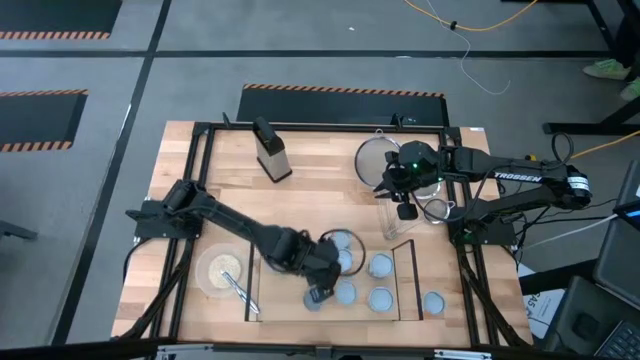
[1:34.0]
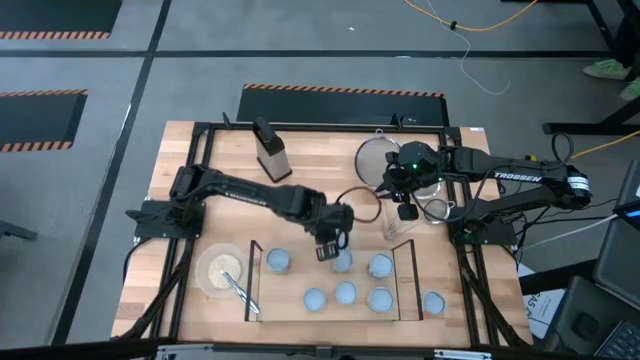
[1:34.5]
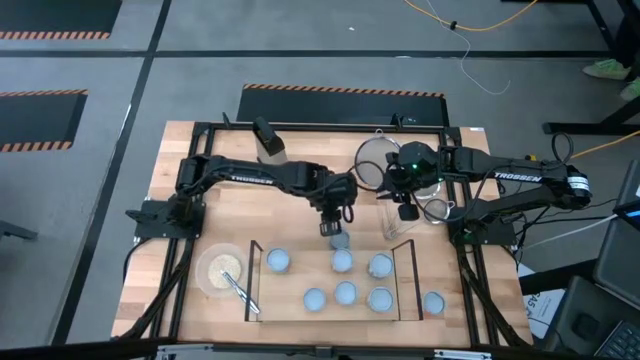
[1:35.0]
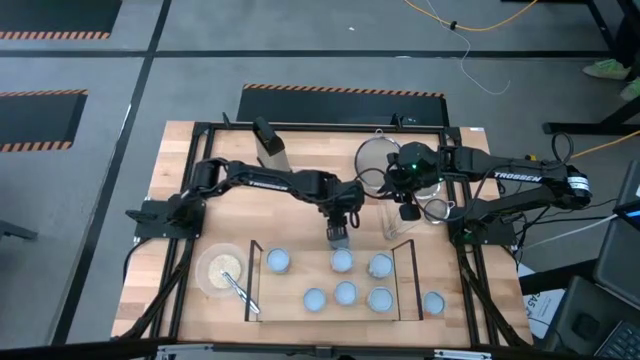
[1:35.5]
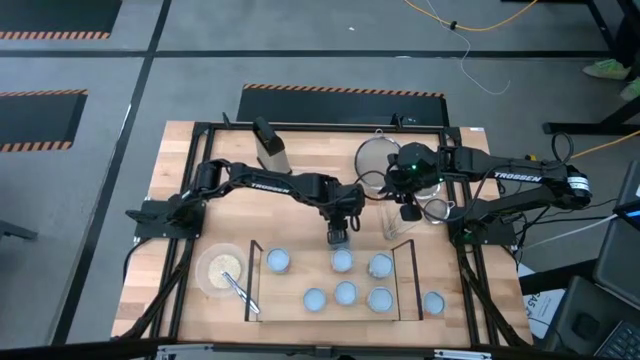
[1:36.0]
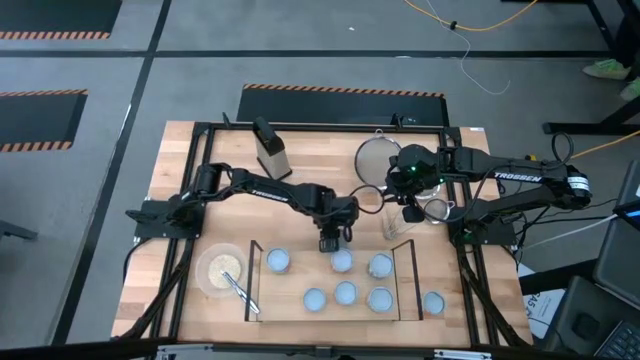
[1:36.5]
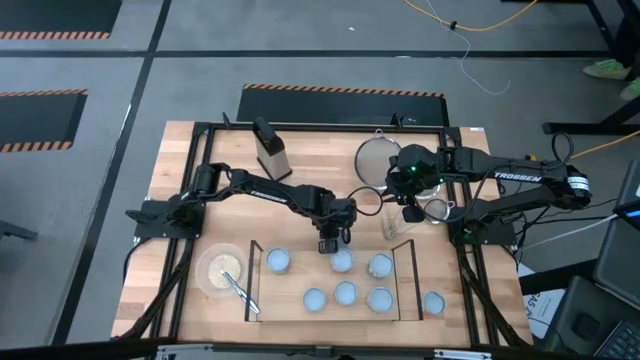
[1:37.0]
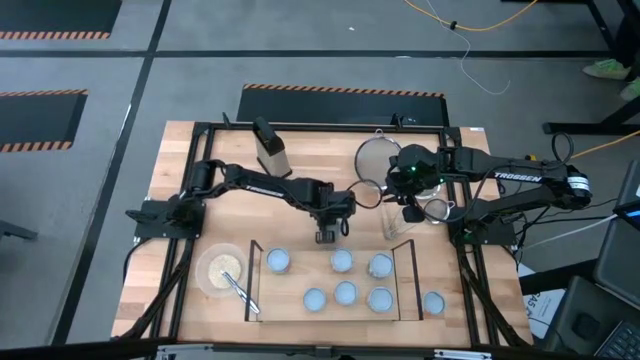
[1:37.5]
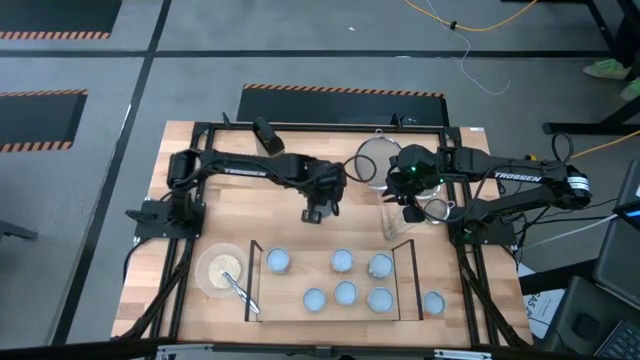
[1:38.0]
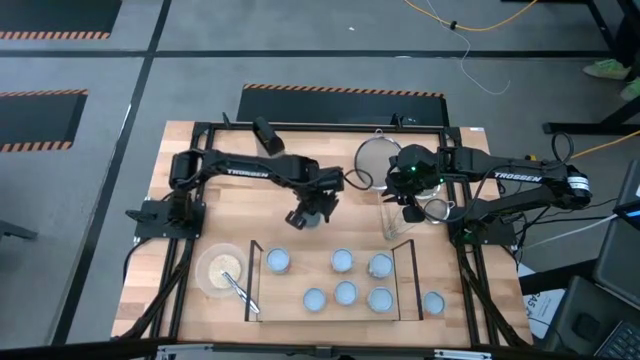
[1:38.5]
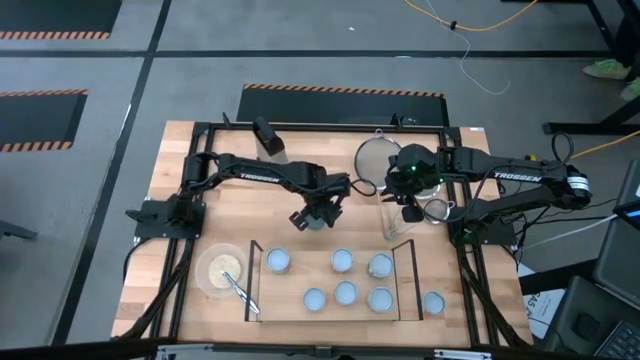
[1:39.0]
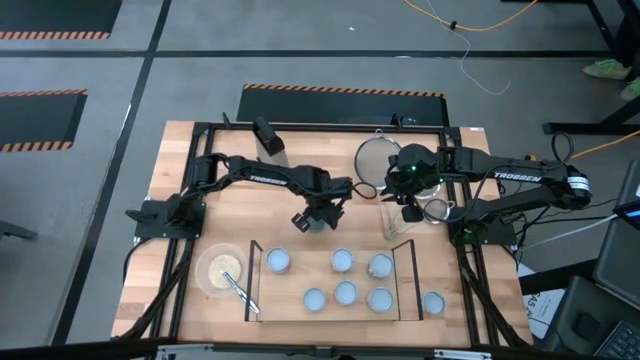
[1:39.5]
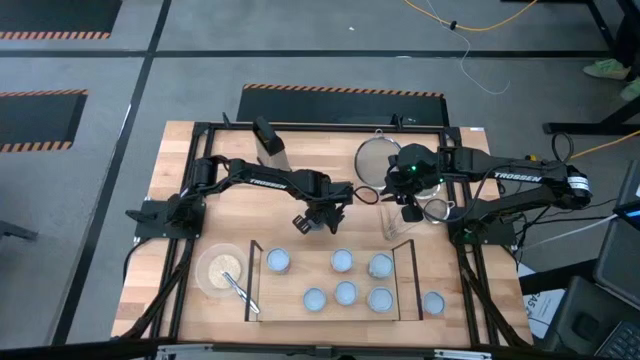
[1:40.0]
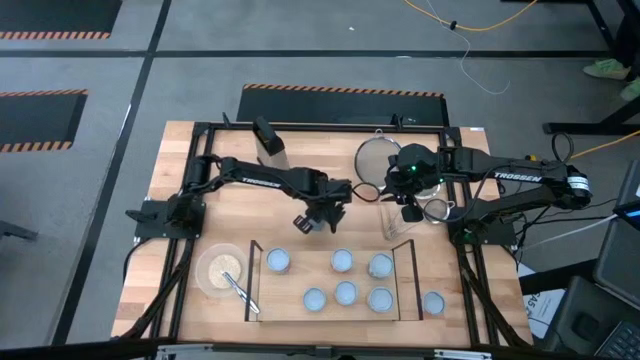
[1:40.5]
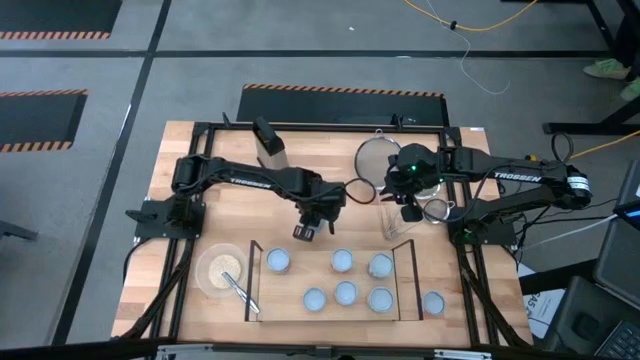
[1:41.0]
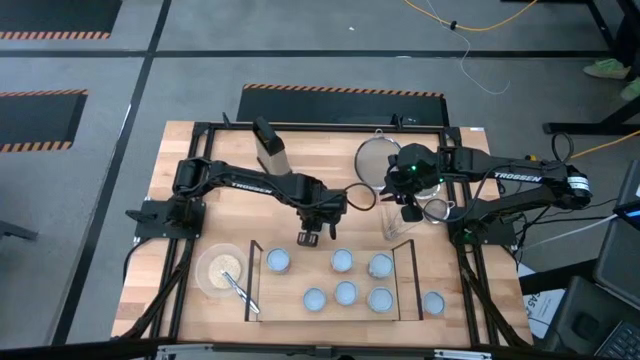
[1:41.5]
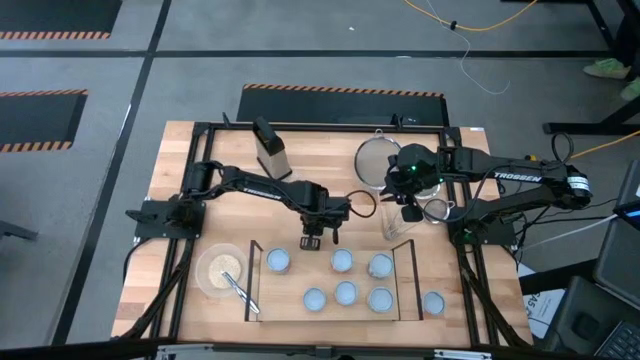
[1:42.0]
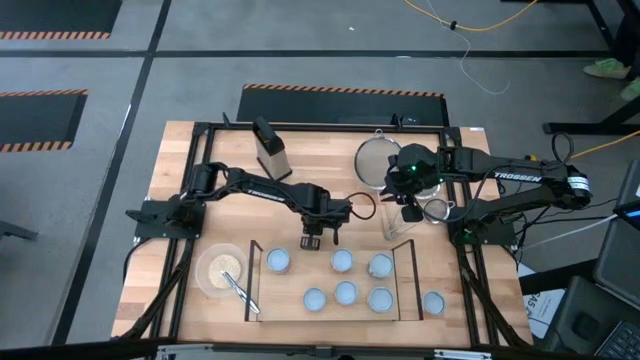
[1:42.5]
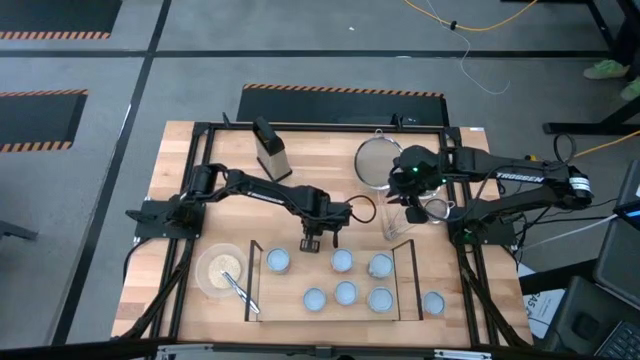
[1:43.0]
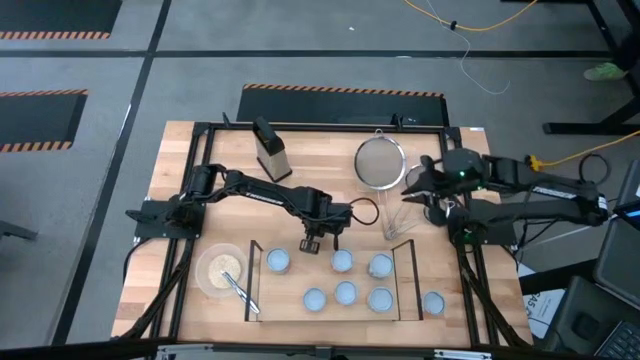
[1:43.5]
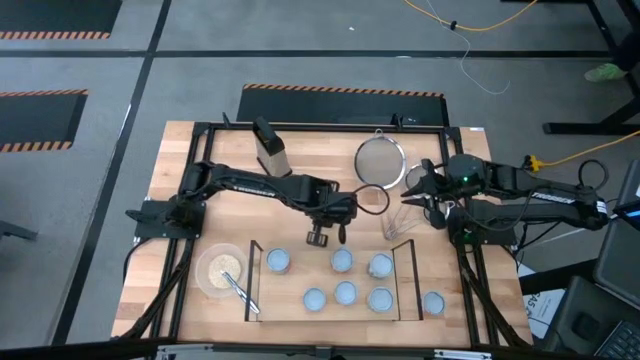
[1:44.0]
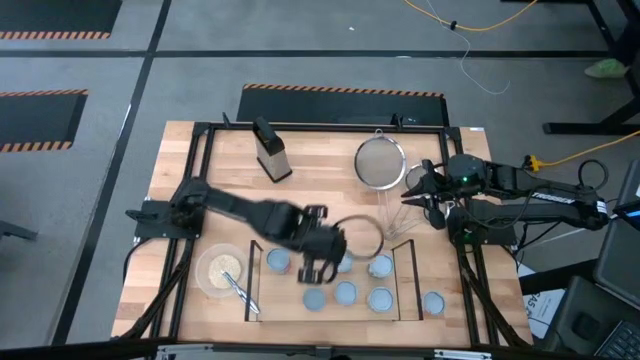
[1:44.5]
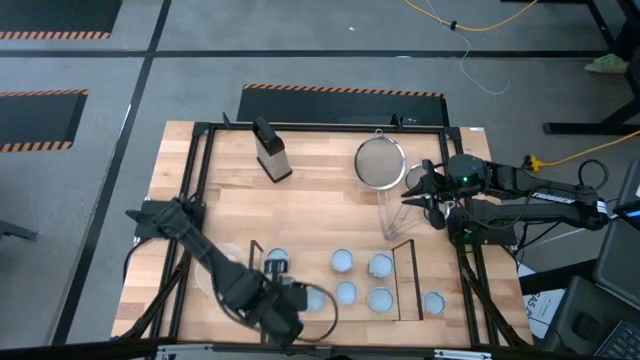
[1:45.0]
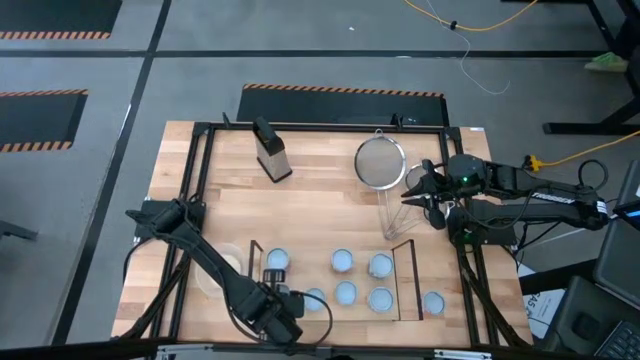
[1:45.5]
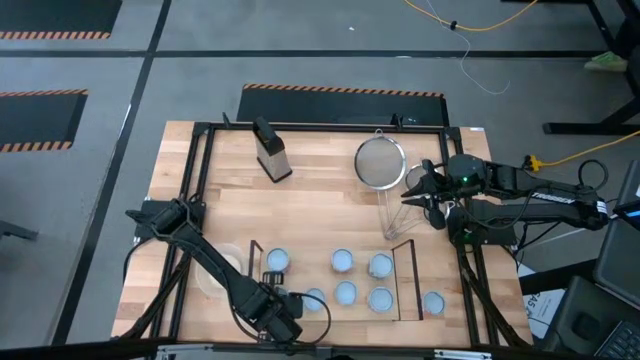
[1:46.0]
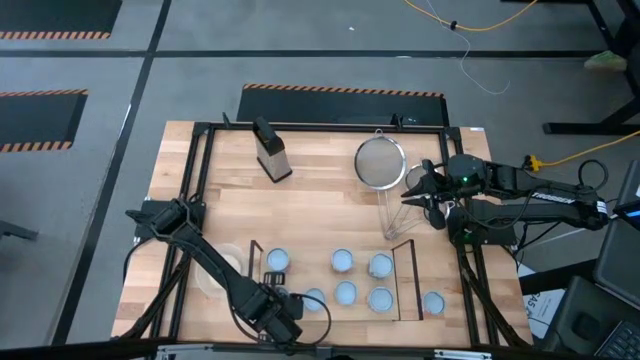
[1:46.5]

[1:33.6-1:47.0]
Task: Pick and place cans onto a shelf
Put the tuna can on the shelf

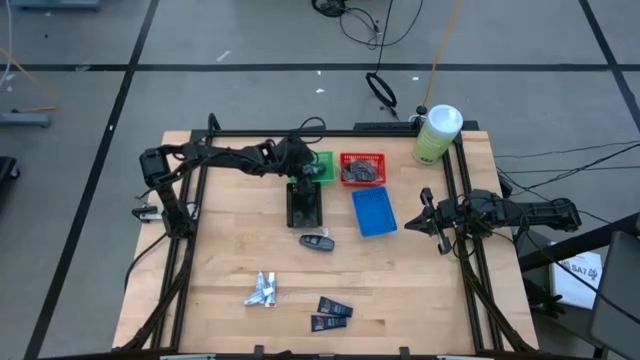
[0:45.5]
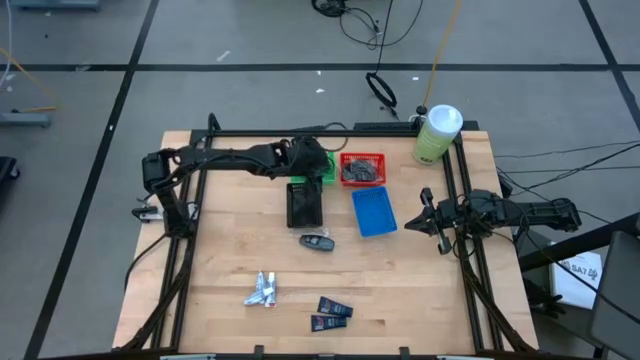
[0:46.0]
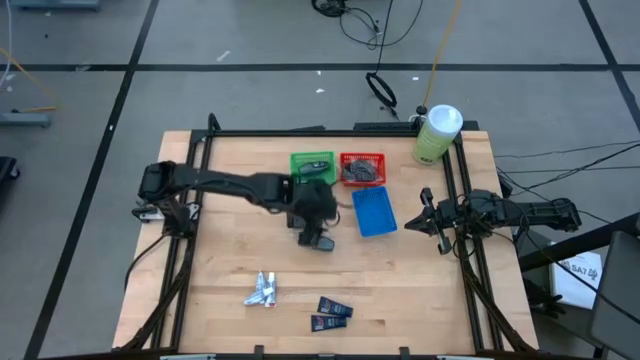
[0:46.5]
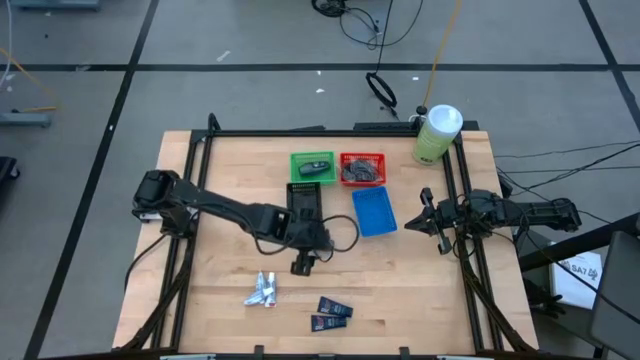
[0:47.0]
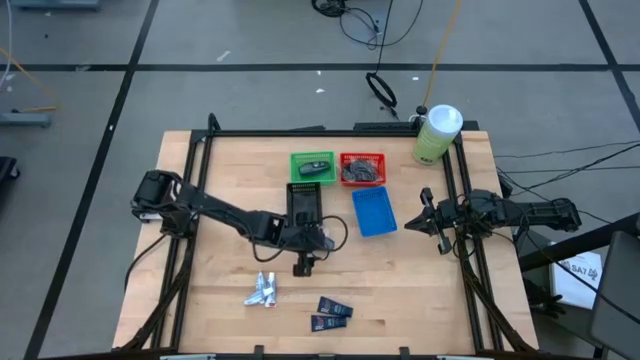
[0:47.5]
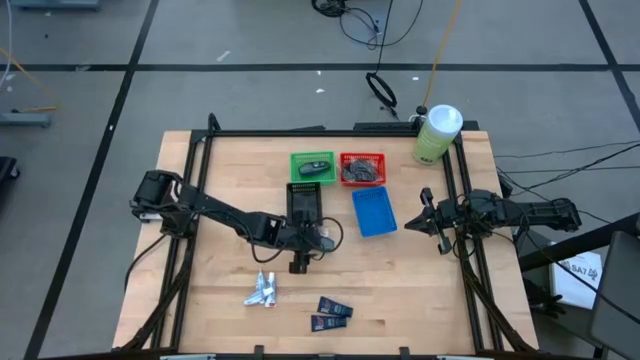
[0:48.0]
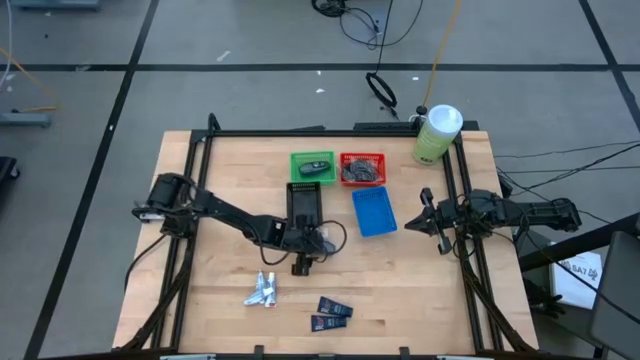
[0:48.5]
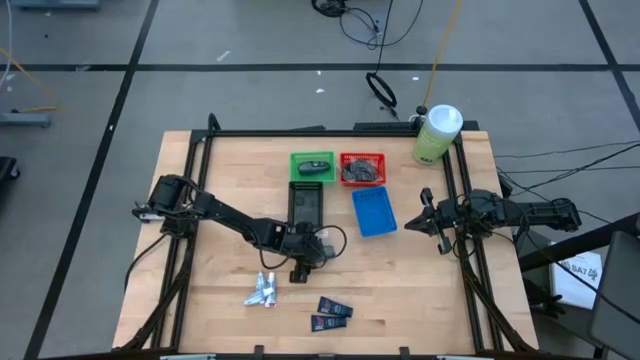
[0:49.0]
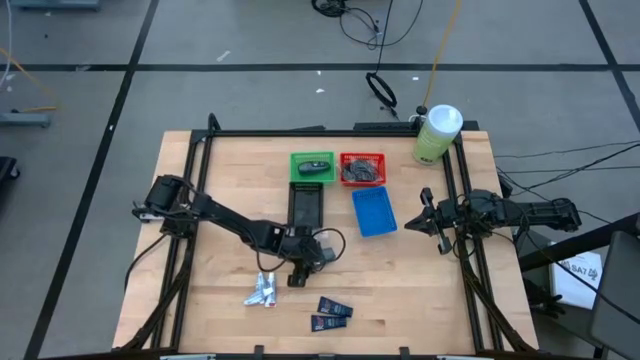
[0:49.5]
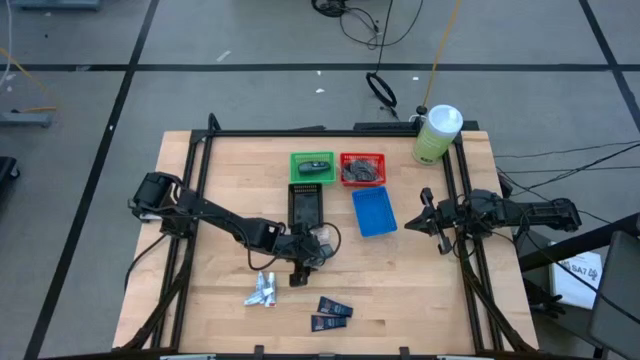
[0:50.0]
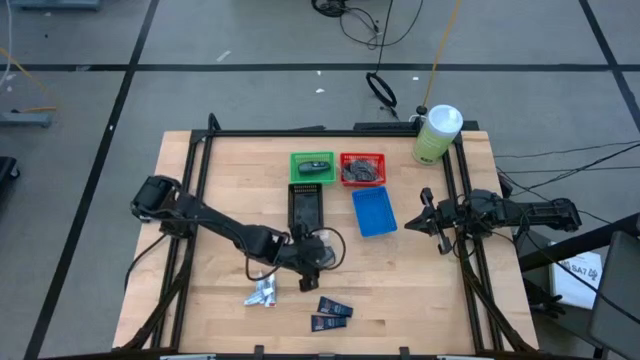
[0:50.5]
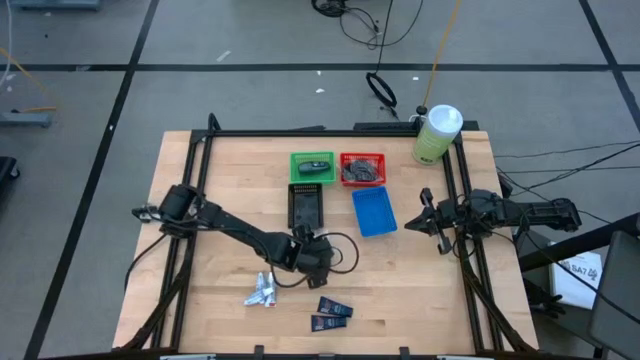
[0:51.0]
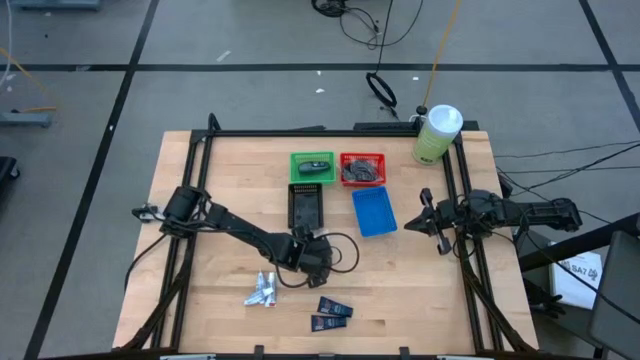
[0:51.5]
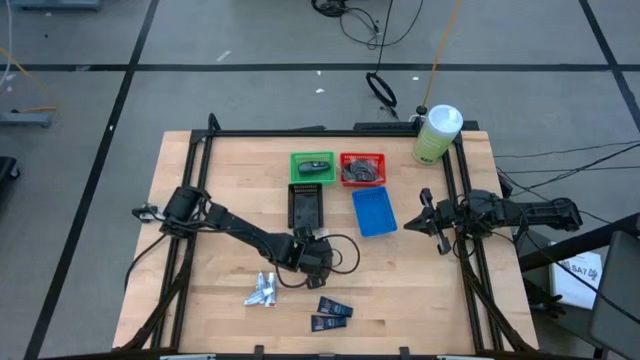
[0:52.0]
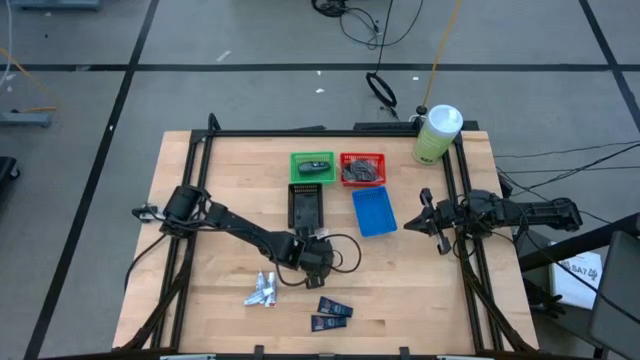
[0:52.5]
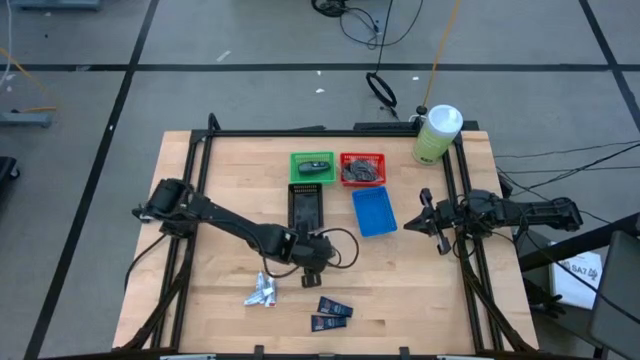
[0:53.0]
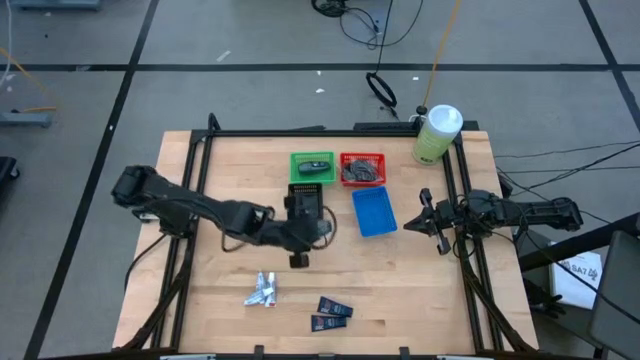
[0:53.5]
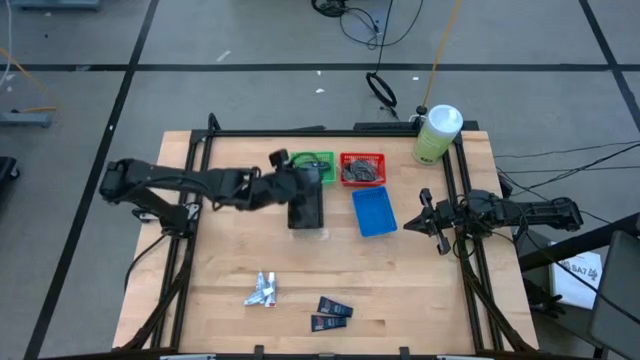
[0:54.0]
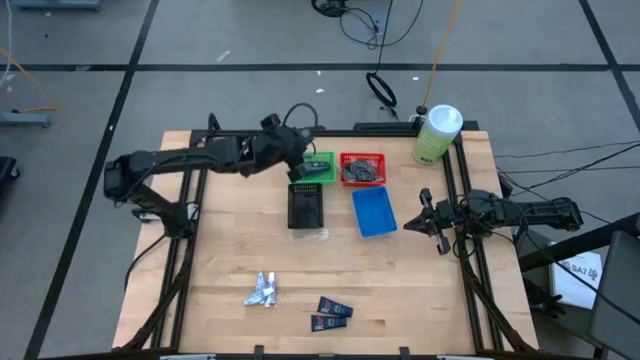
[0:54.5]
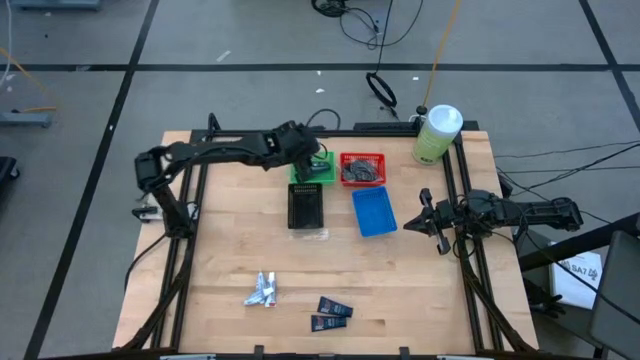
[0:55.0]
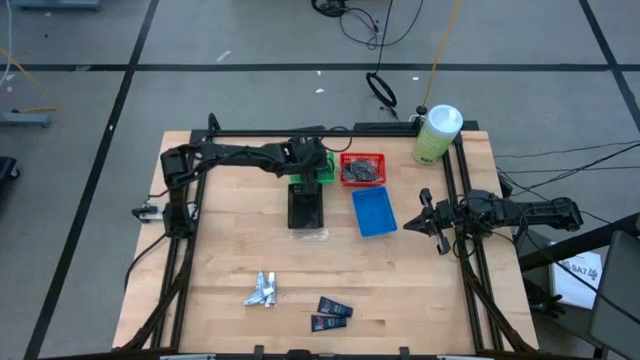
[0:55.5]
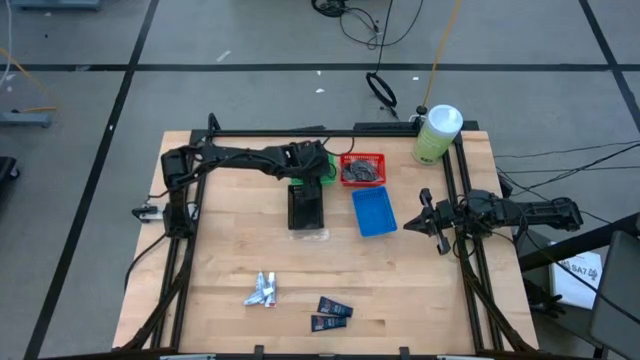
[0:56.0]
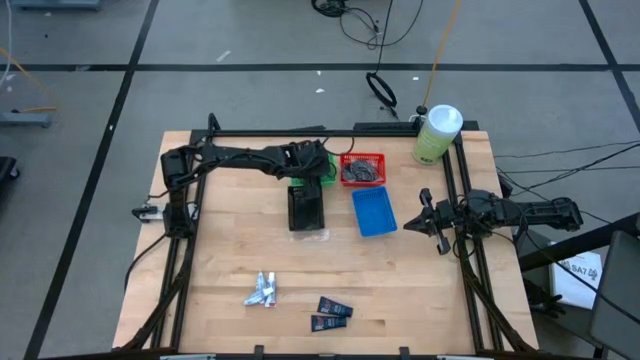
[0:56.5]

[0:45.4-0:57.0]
Task: Pick & Place Travel size toiletries
Put the gray deodorant into the green bin
